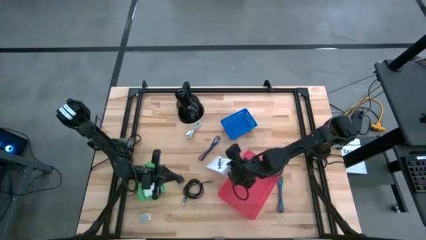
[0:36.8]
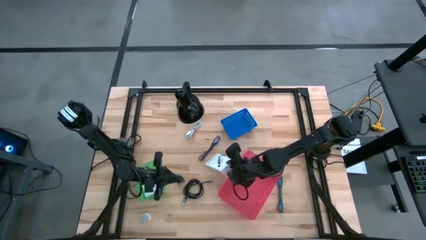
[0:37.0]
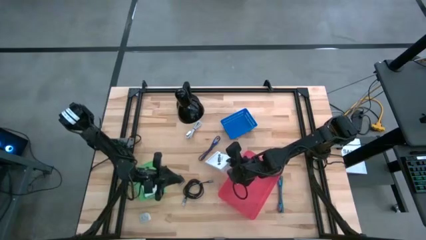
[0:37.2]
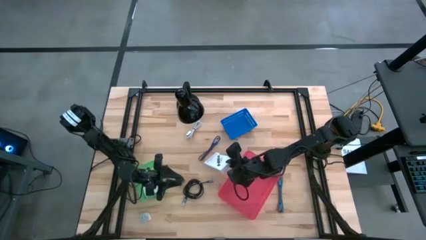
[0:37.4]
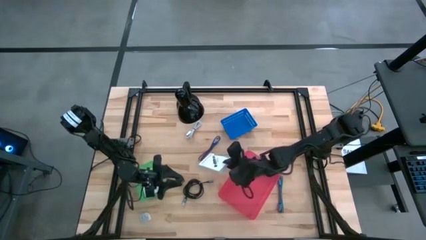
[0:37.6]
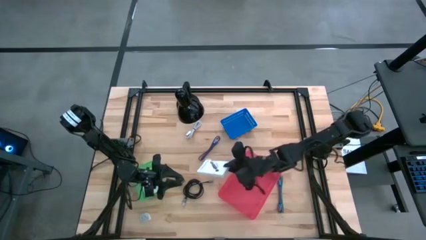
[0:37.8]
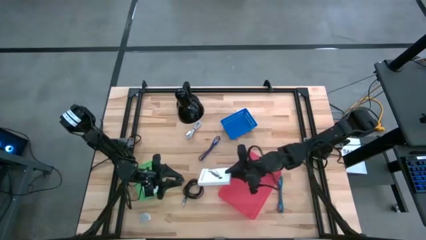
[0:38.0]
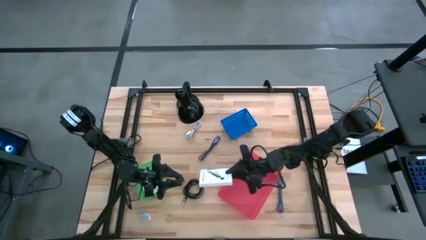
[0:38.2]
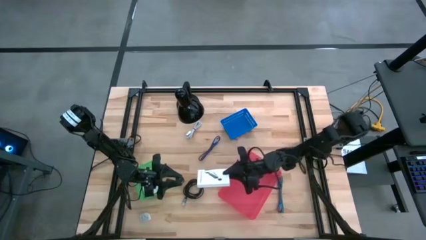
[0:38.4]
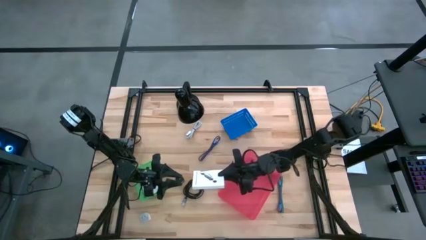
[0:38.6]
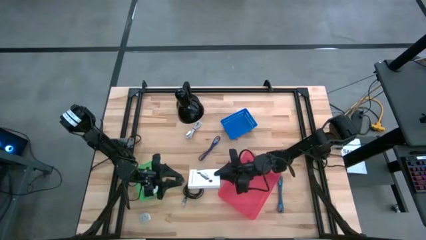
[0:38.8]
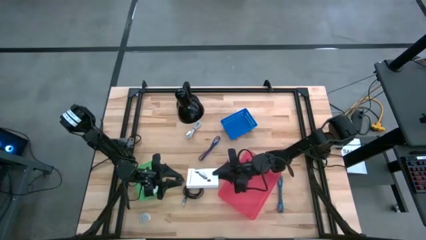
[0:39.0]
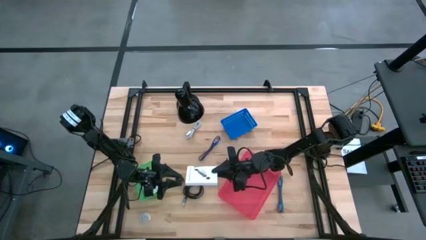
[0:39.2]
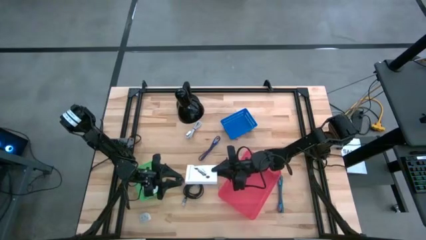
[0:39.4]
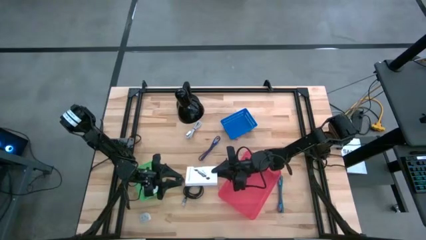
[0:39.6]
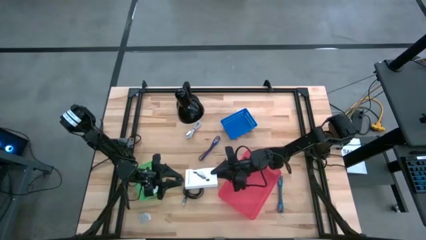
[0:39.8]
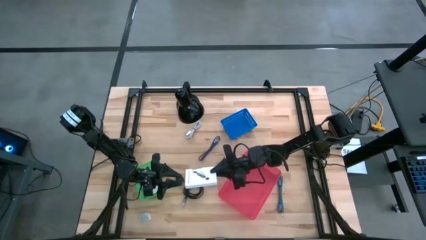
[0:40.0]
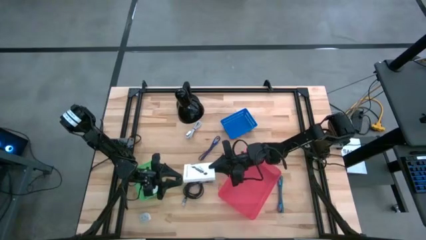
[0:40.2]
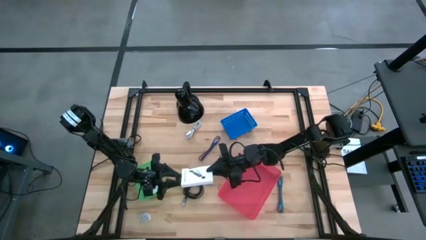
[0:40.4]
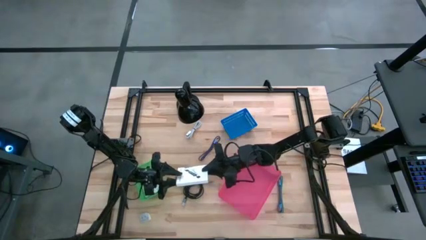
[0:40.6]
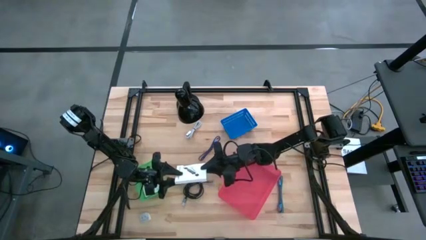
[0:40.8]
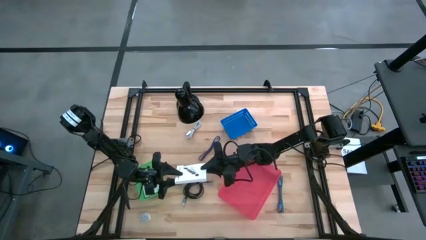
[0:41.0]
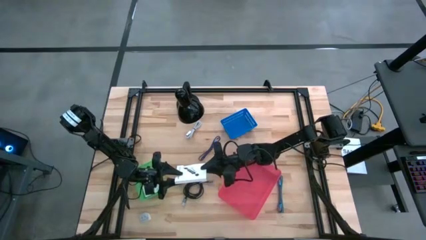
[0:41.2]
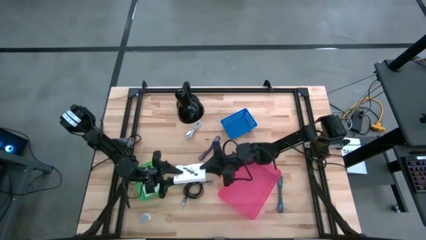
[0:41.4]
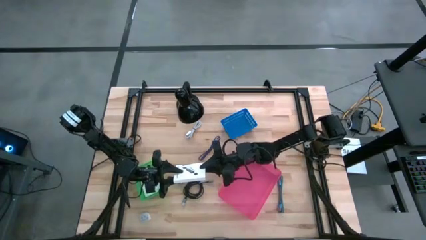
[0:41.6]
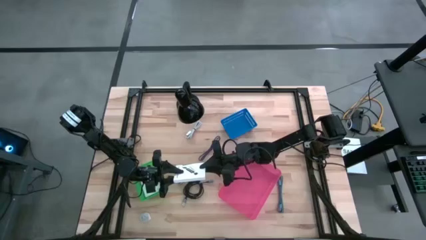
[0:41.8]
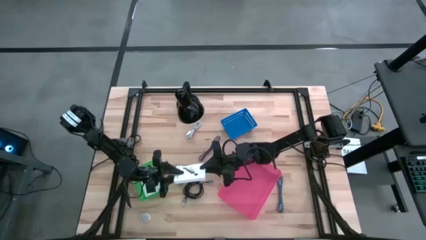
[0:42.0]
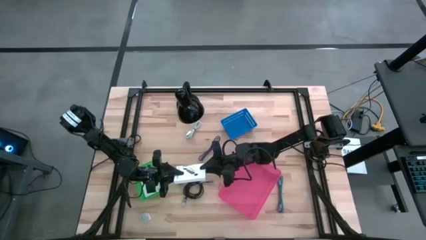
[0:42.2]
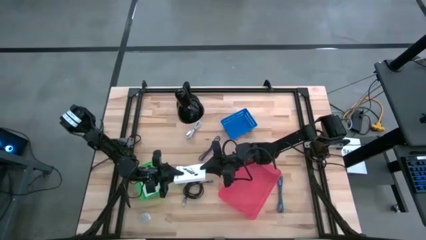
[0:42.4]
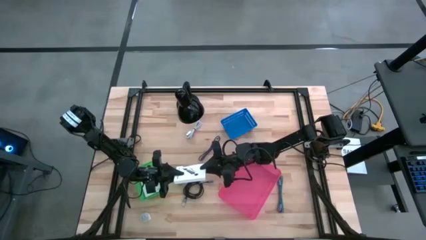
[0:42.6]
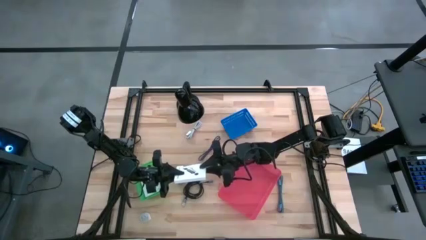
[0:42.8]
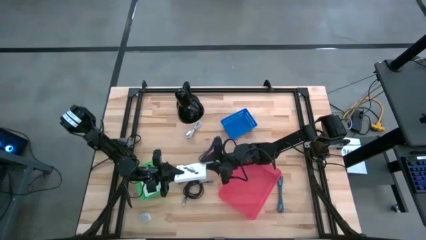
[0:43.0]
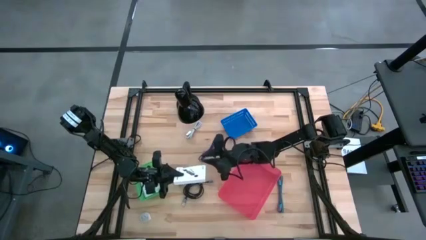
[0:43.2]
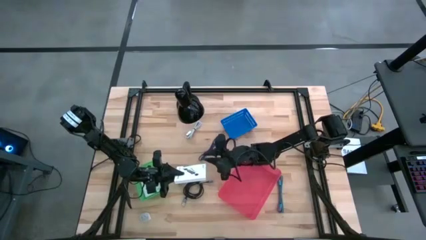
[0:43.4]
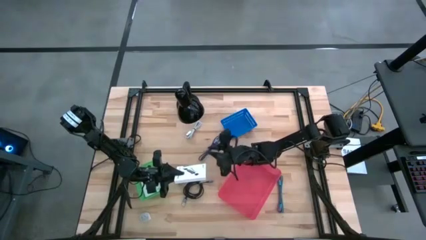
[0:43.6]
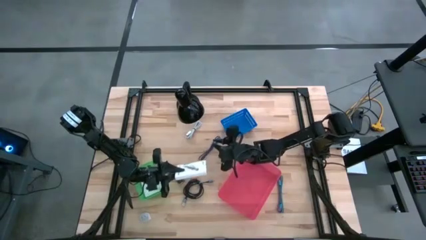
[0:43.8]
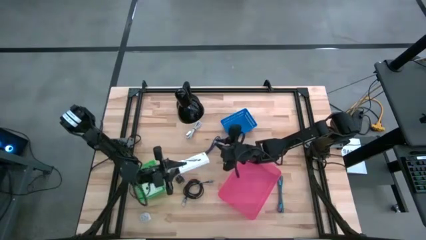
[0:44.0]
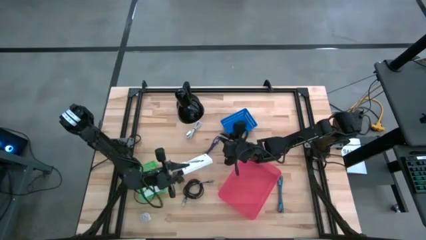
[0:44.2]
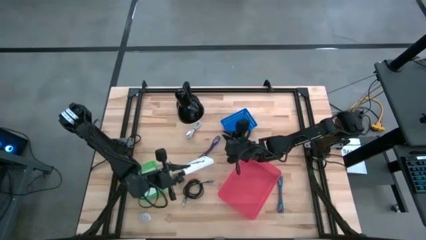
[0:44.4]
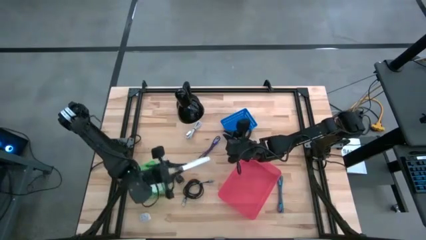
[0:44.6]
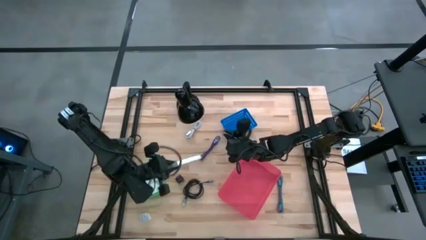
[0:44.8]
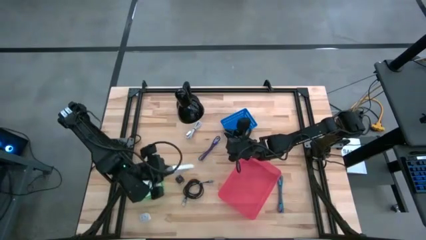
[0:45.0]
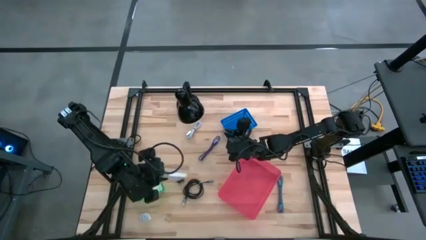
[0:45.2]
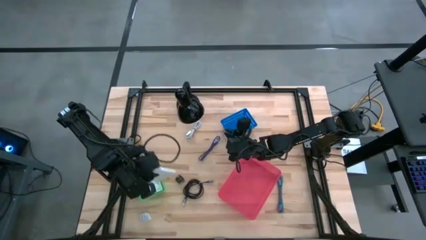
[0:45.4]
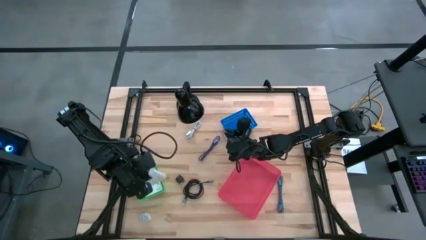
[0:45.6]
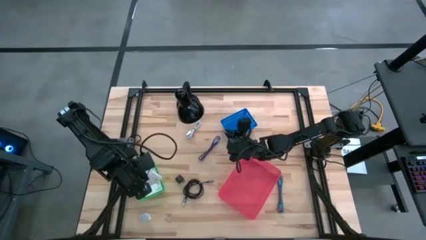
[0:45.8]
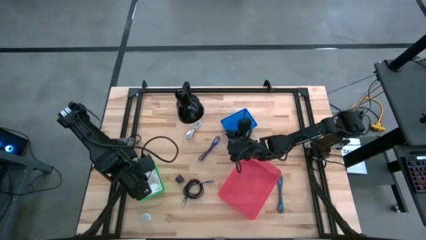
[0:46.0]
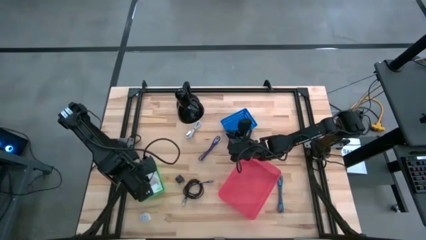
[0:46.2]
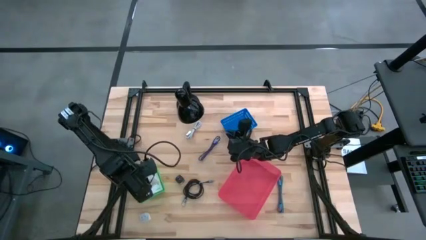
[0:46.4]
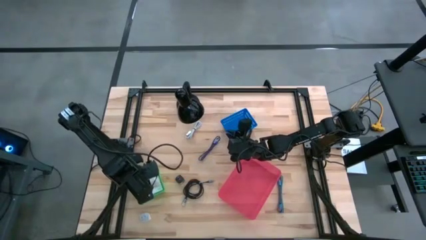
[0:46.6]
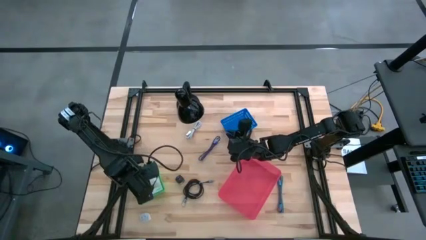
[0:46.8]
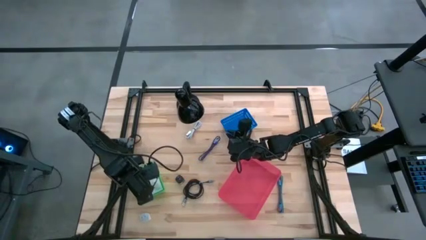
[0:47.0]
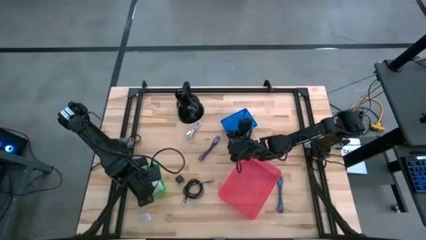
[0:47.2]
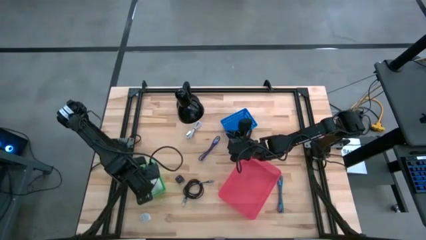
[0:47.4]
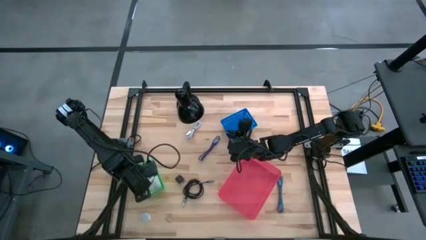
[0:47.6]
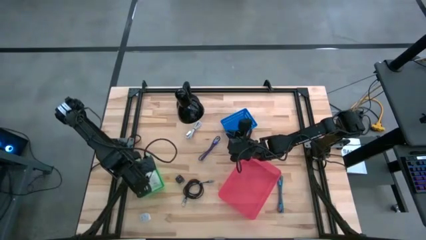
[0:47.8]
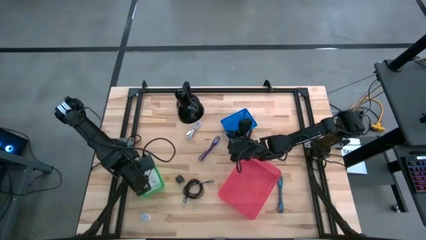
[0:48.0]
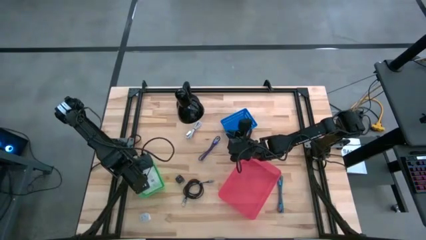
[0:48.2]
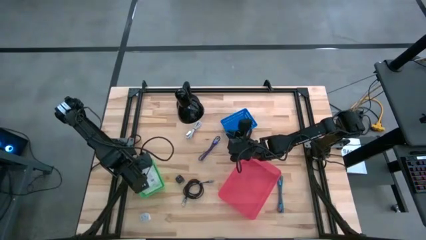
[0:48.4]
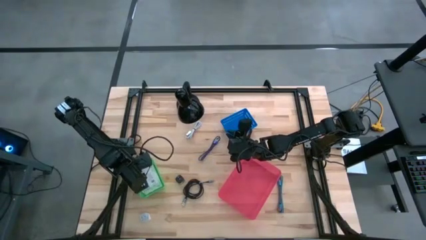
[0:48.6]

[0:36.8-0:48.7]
Task: Pick and place items into bin
Put the white card reader box into the green bin
